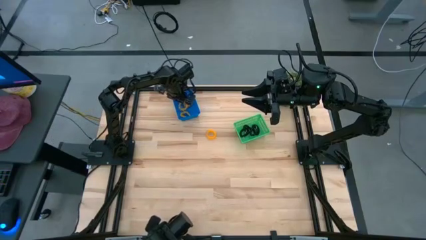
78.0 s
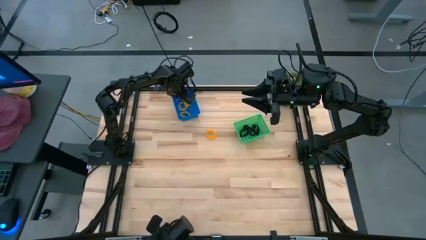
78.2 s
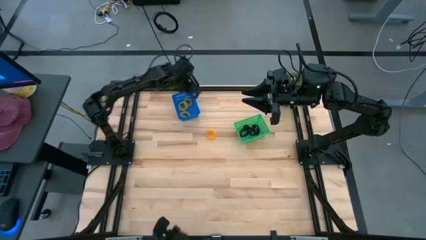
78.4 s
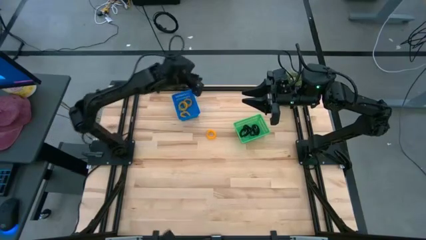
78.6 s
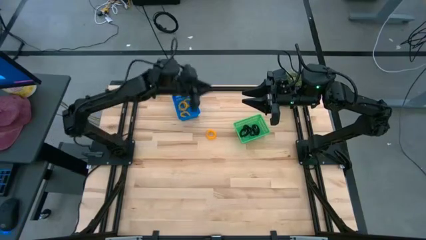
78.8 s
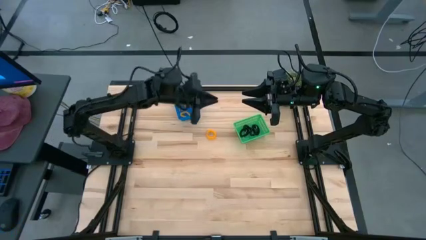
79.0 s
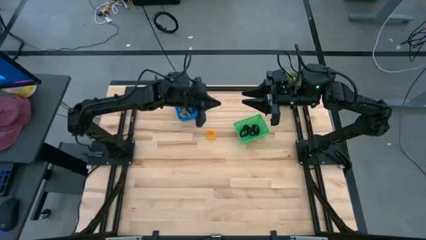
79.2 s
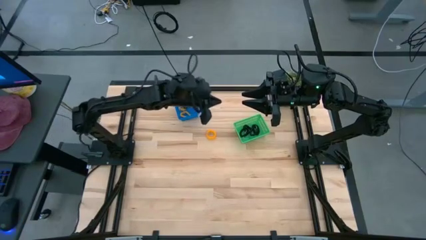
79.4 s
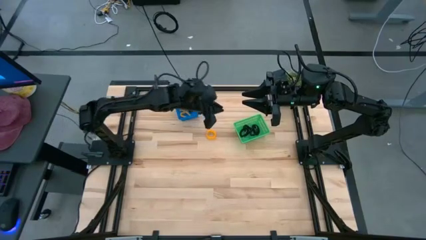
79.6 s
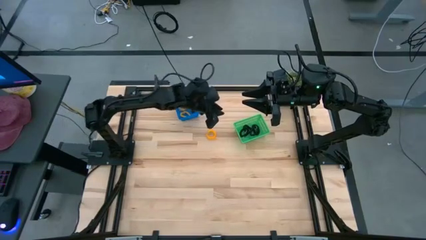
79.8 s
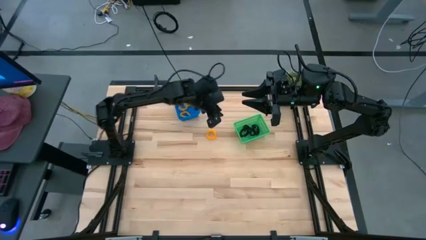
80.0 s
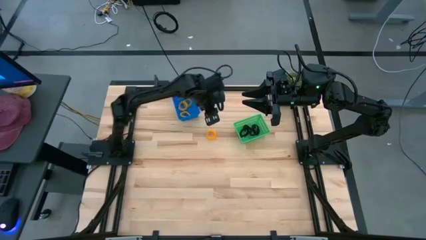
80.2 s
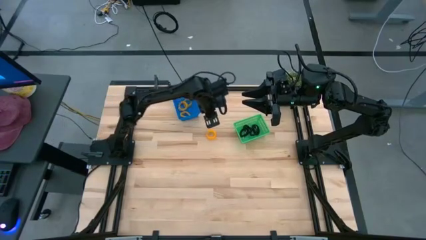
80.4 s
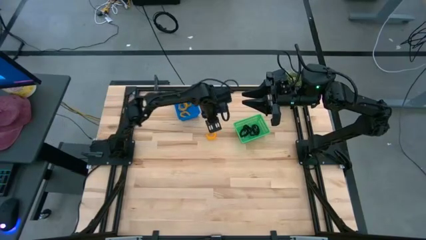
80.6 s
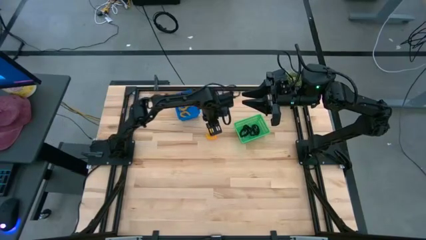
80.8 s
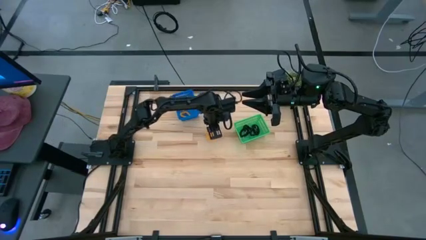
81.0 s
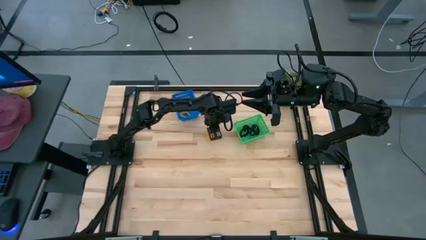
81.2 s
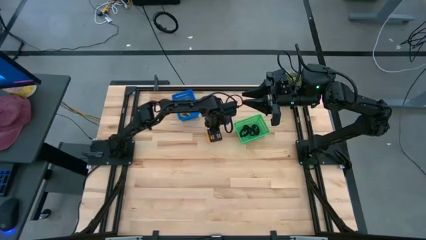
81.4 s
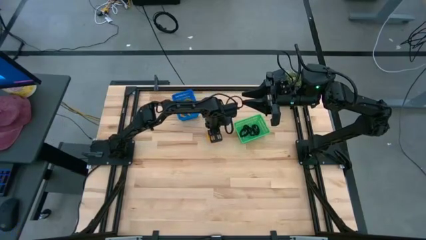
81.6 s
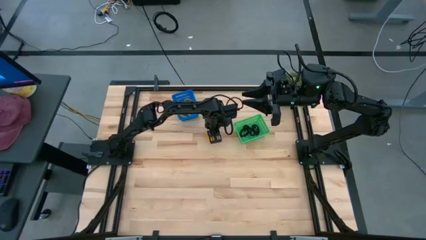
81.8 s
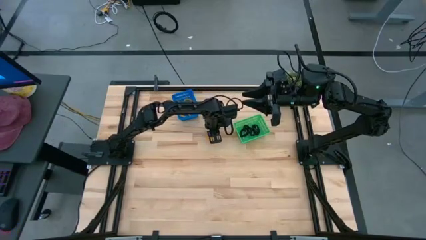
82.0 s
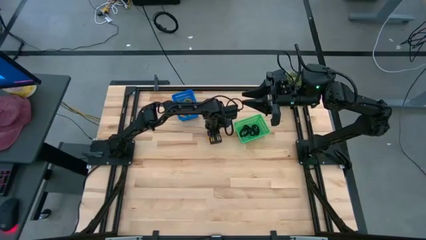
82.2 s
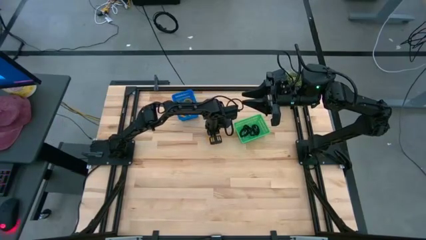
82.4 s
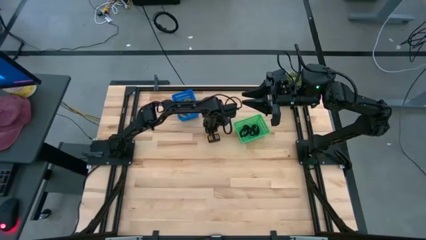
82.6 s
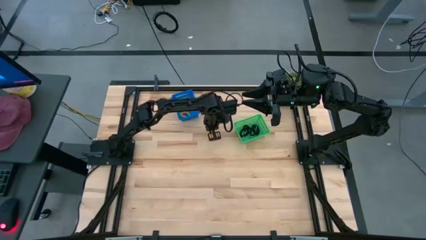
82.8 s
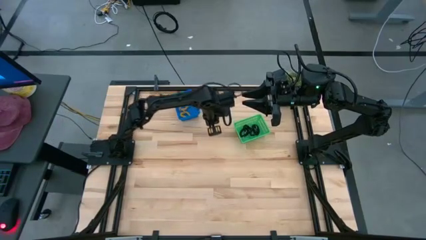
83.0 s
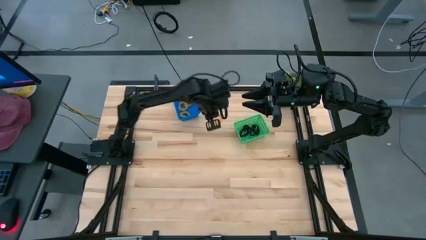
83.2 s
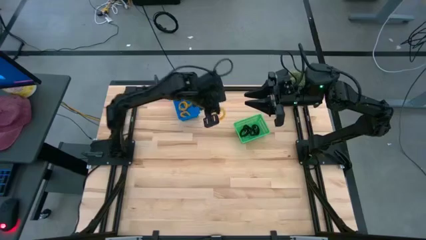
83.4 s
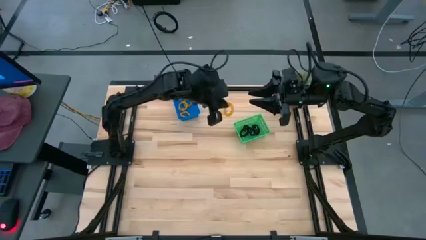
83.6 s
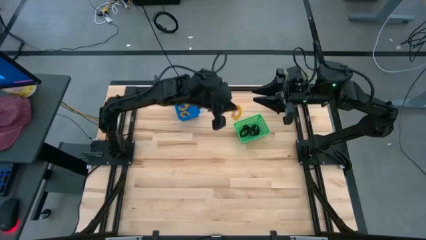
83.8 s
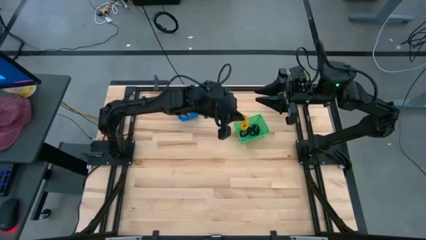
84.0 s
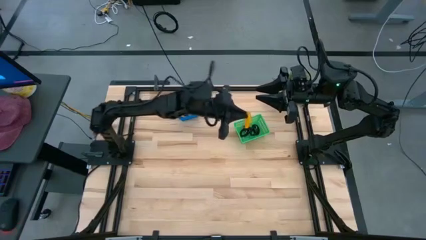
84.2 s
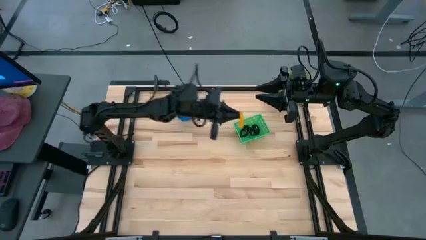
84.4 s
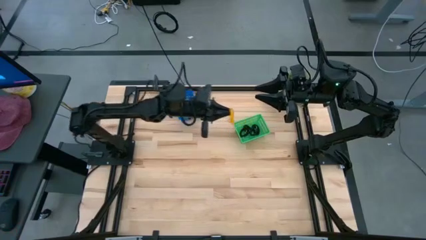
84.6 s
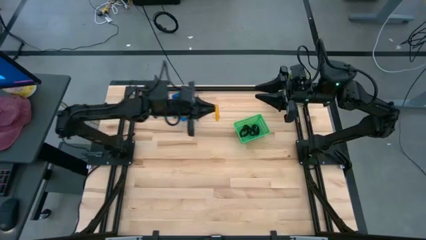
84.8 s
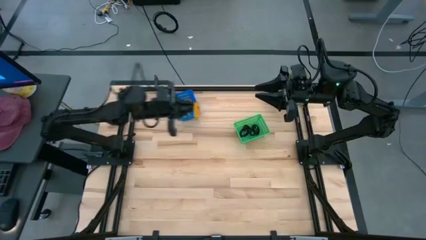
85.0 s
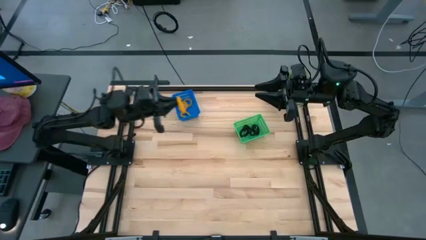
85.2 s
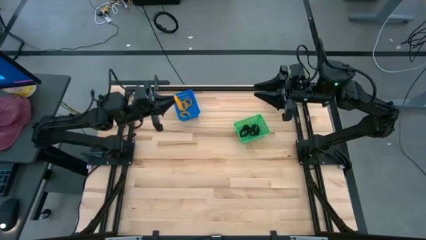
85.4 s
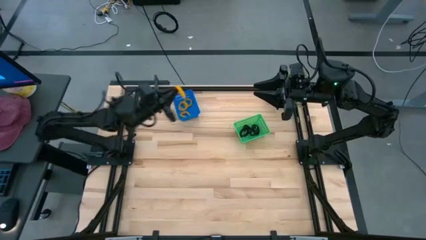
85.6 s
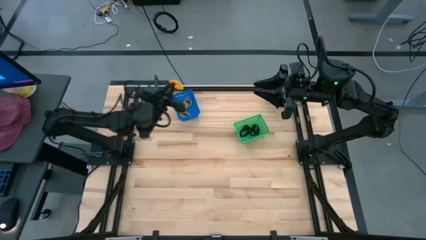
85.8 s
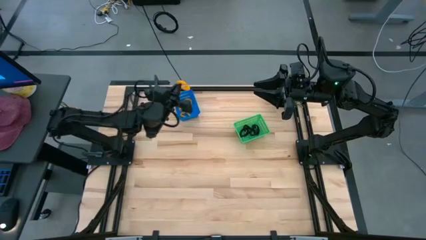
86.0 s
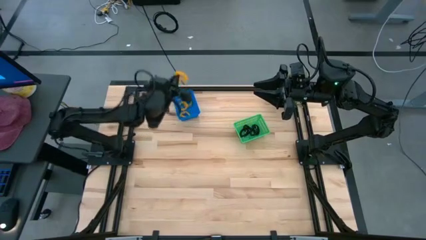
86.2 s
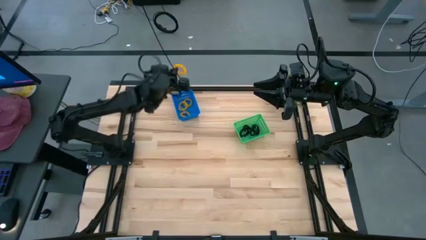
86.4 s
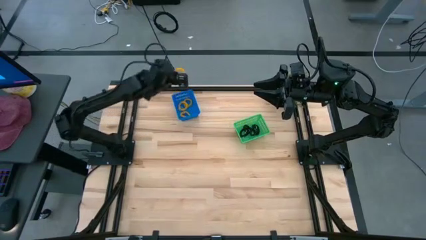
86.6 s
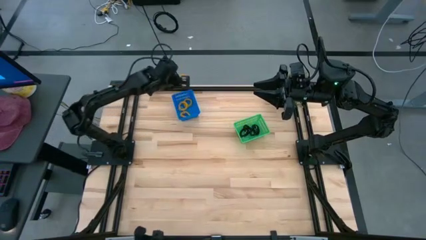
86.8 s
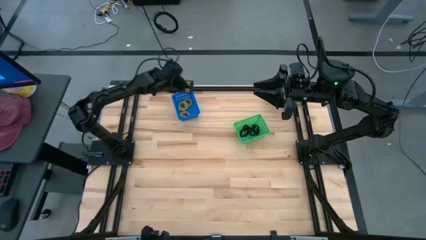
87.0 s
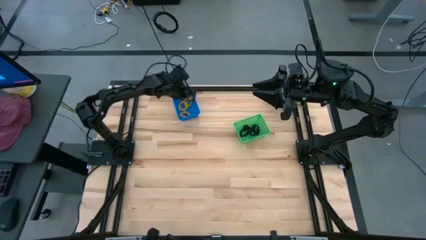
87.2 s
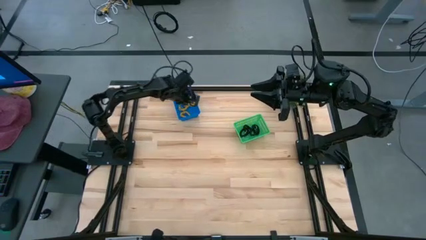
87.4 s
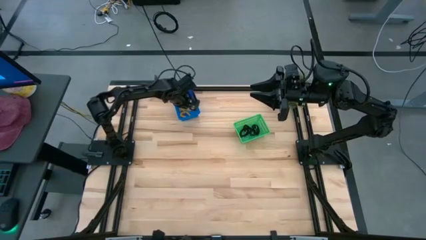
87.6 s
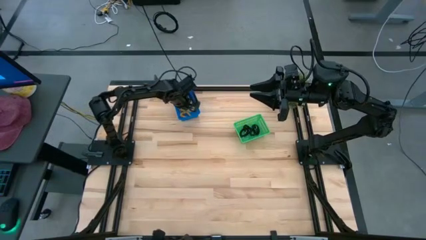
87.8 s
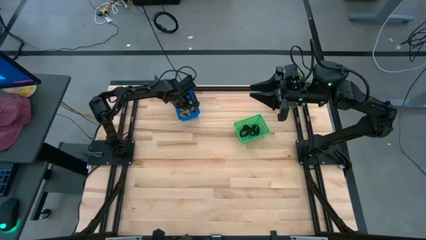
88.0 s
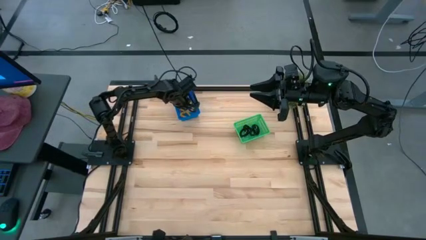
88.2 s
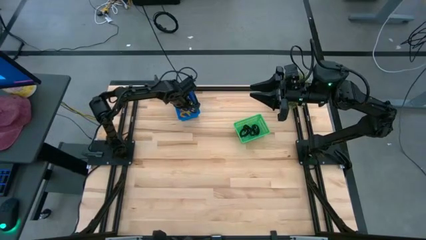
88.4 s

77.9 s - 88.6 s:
Task: Sort spring keychains
Put the yellow spring keychain into the blue bin
